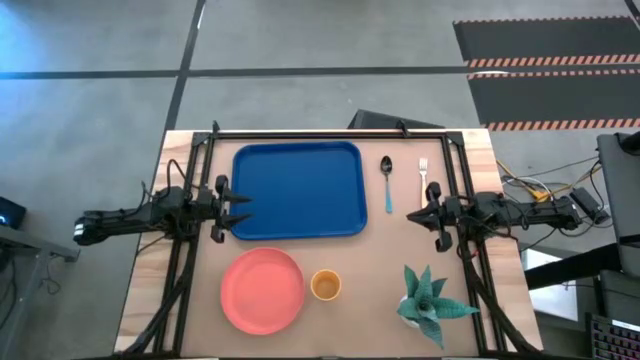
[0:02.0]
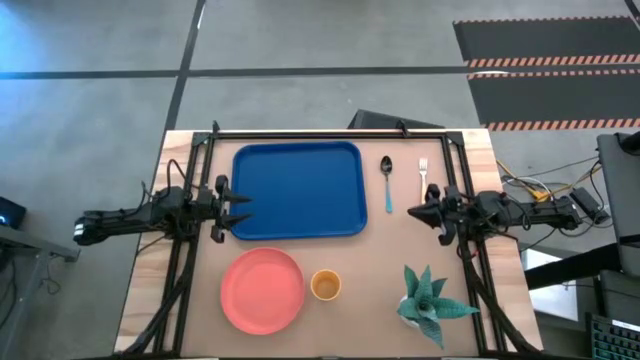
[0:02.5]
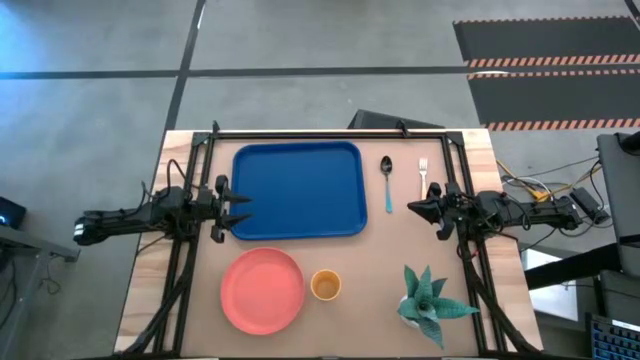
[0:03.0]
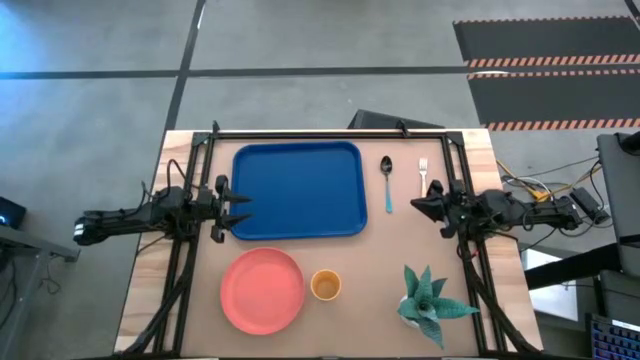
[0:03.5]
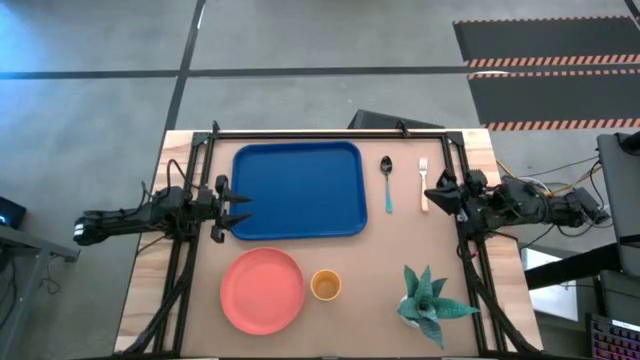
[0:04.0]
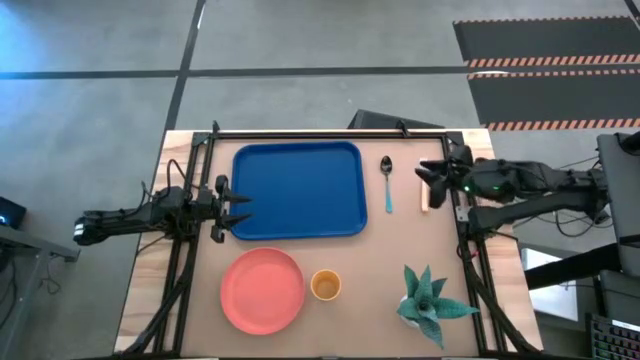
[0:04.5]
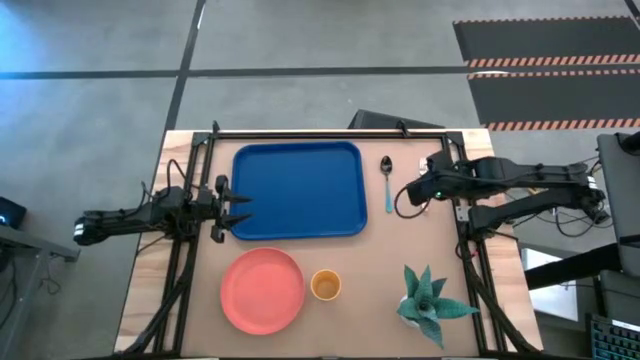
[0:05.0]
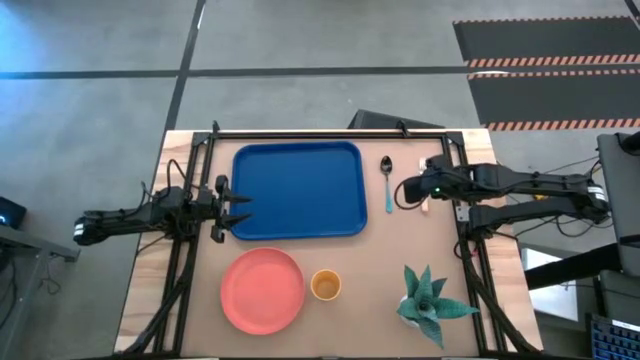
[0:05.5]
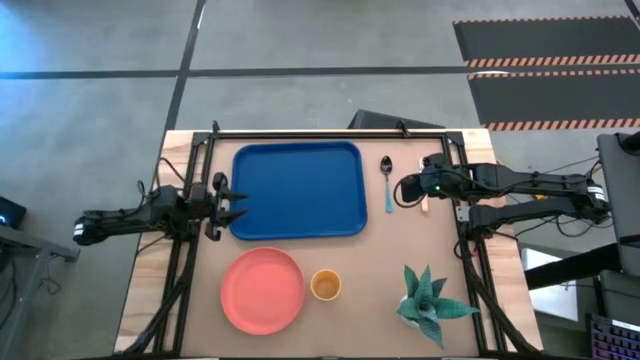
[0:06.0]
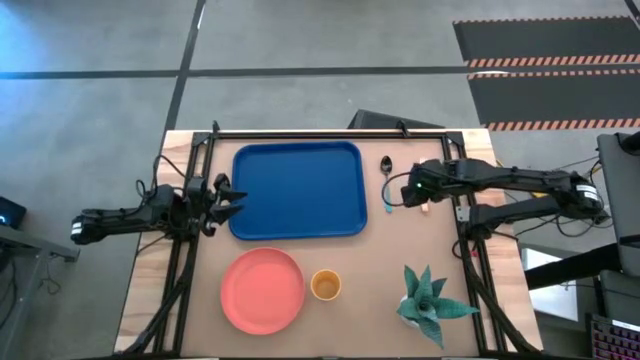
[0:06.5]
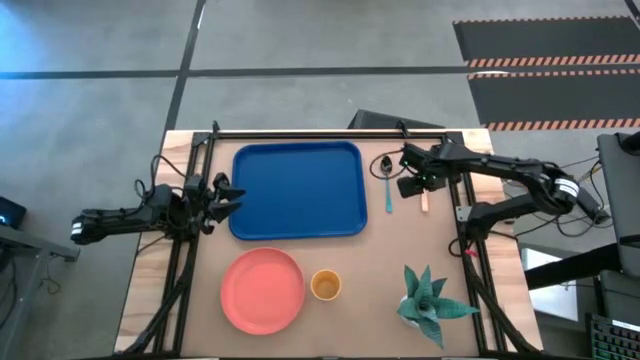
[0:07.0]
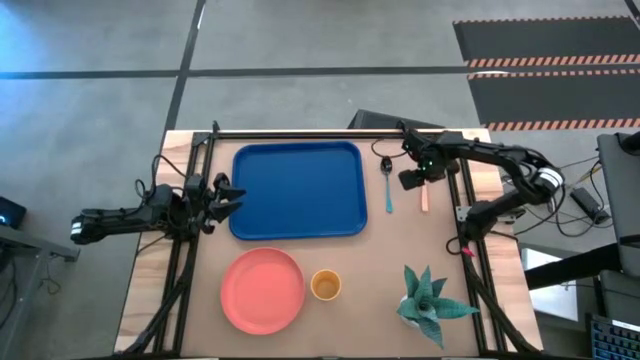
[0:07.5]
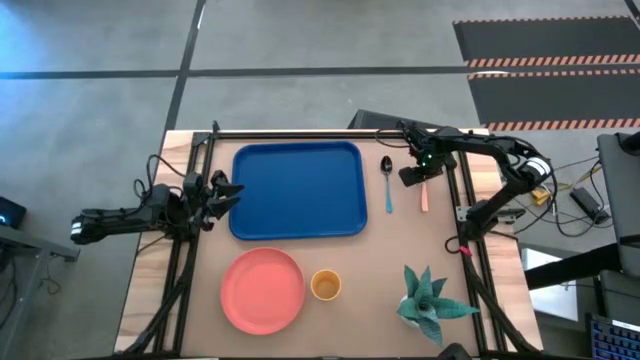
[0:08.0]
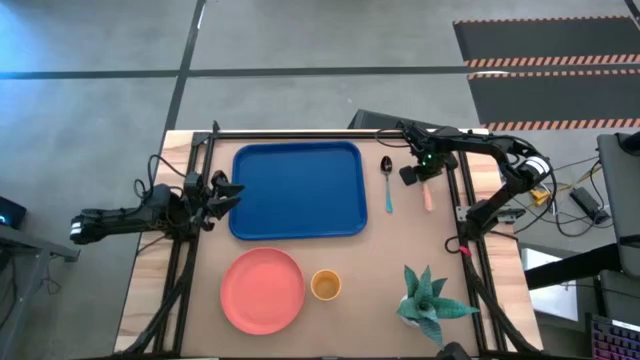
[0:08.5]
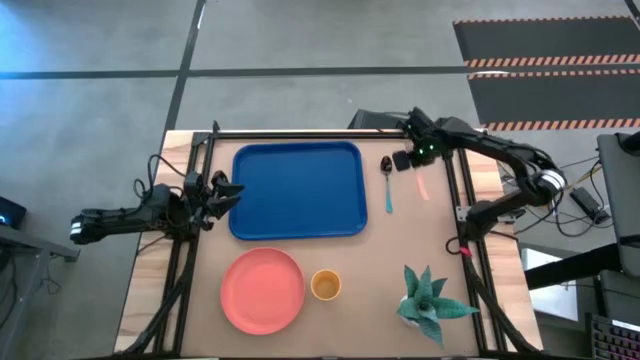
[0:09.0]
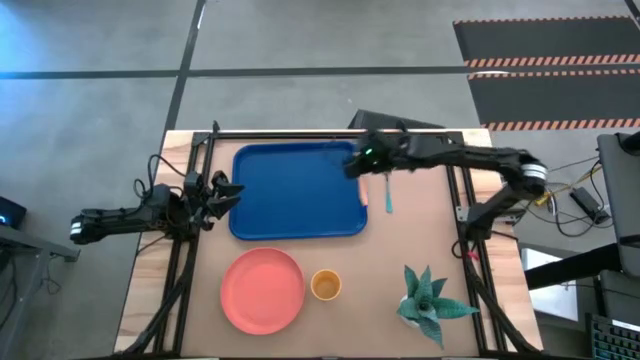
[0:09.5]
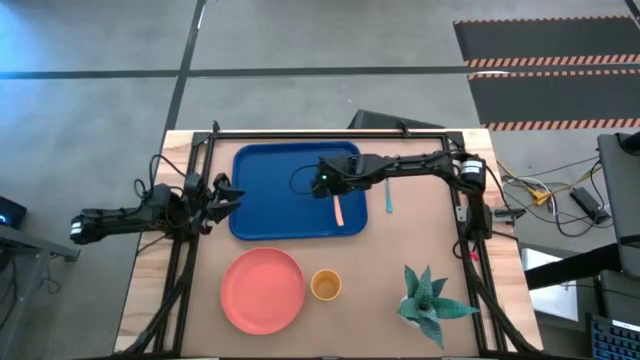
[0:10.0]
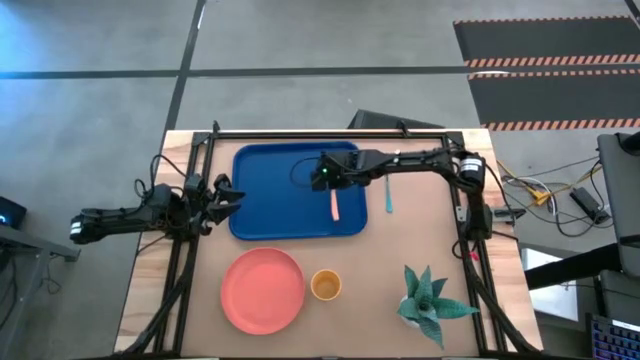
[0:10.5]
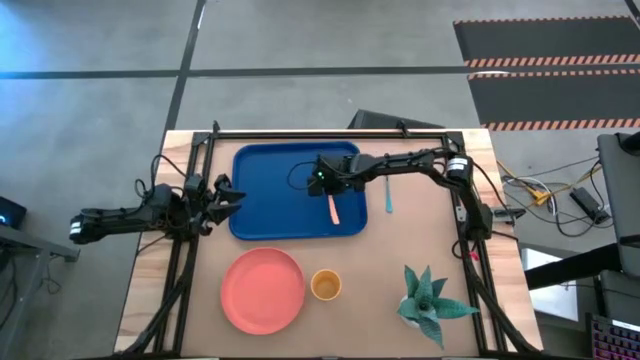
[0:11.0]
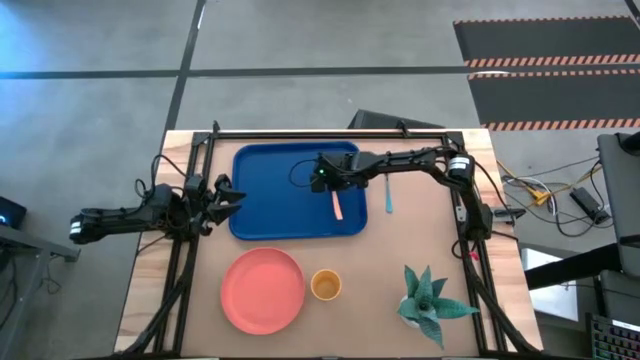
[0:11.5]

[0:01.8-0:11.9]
Task: Pick and place plate/cup/fork/spoon on tray
Put the orange fork on the blue tray

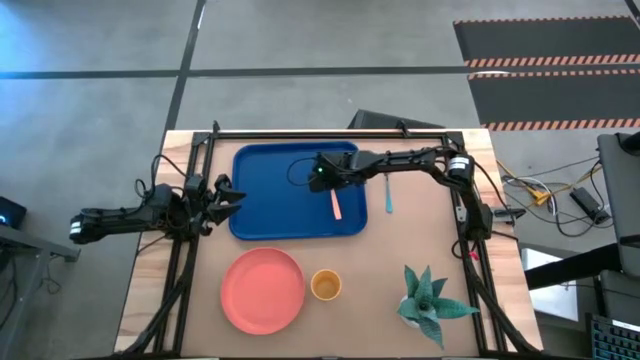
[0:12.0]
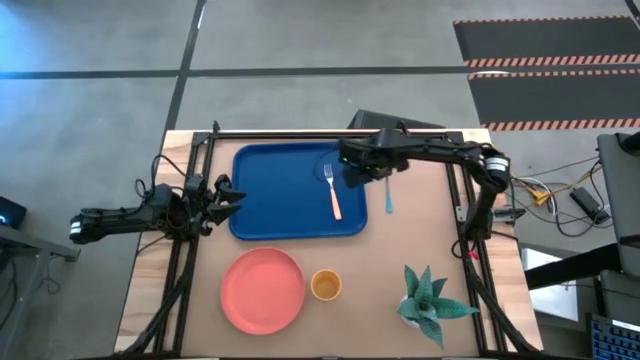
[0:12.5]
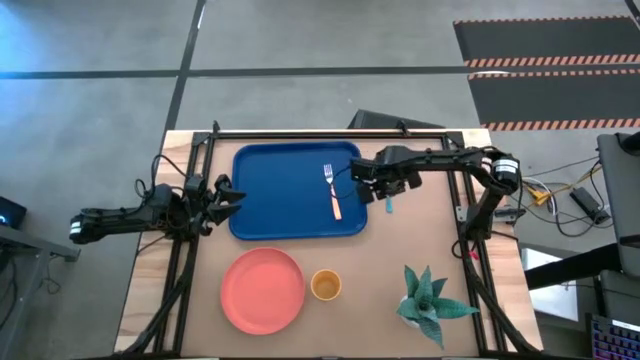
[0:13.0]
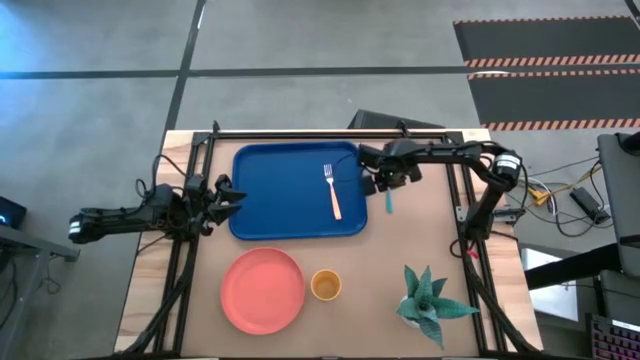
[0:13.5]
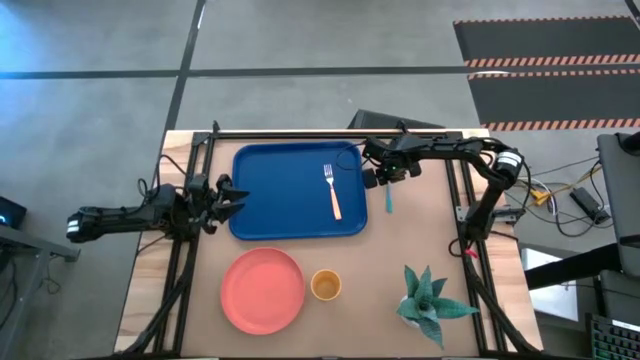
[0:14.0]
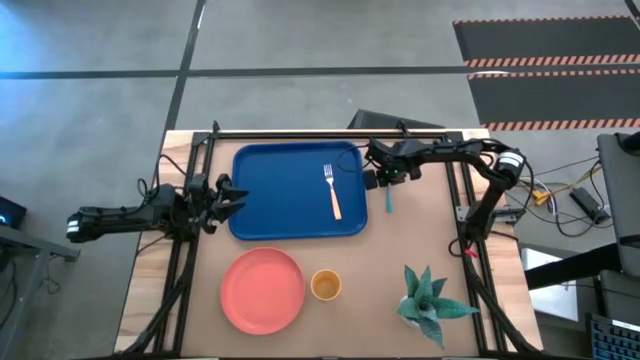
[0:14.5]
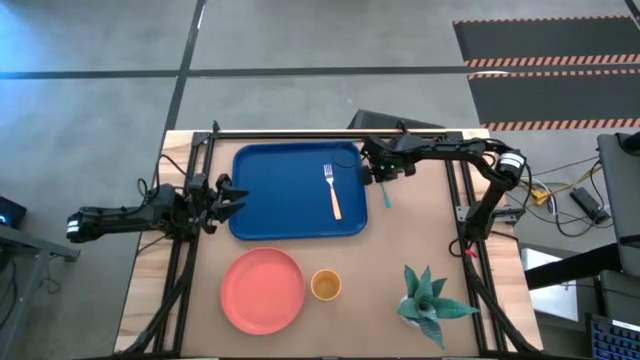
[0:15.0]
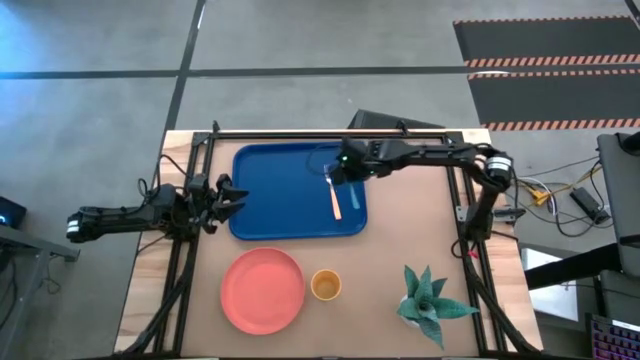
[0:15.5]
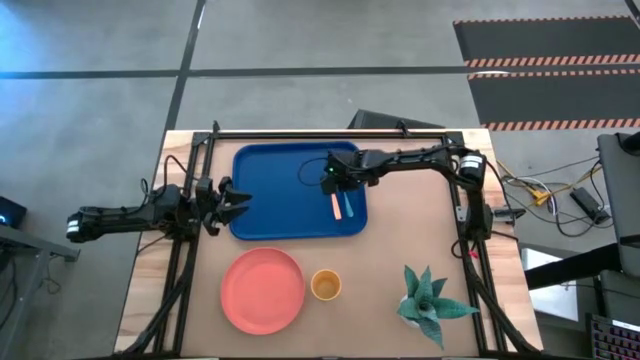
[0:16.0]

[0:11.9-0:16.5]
Put the blue spoon to the right of the orange fork on the blue tray

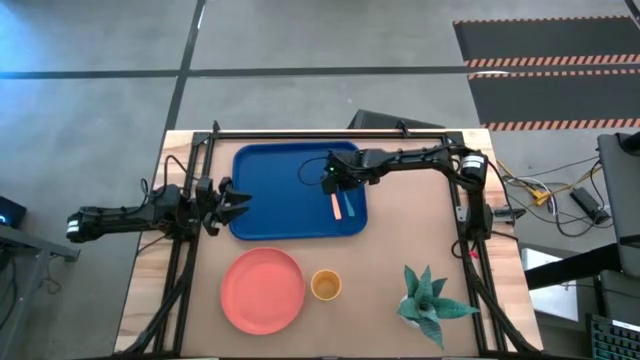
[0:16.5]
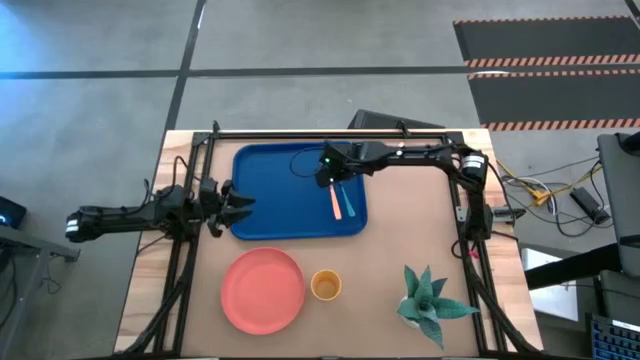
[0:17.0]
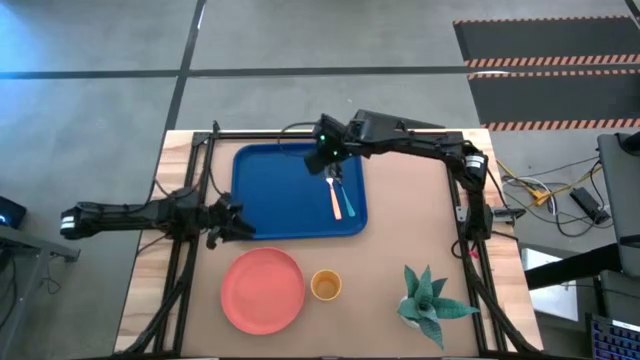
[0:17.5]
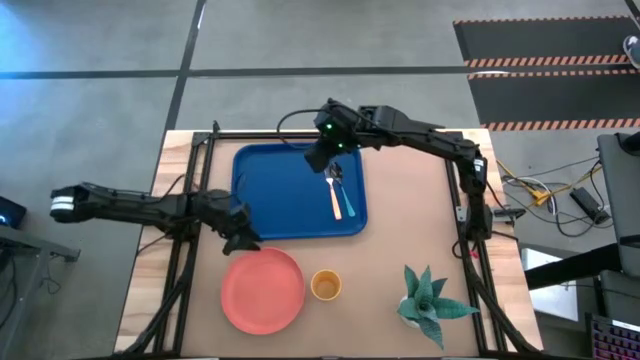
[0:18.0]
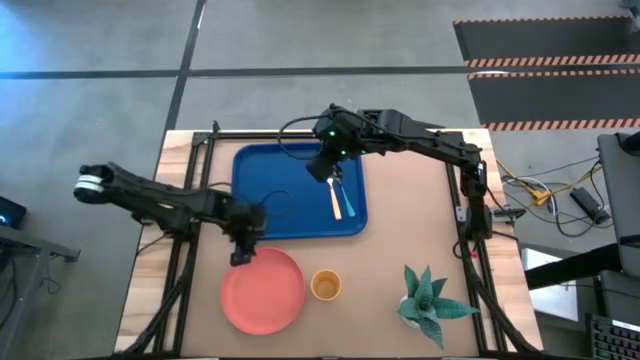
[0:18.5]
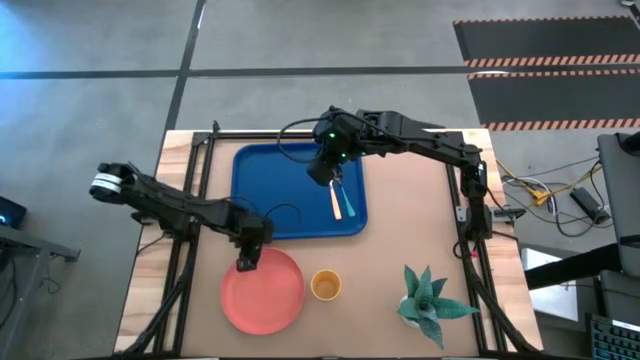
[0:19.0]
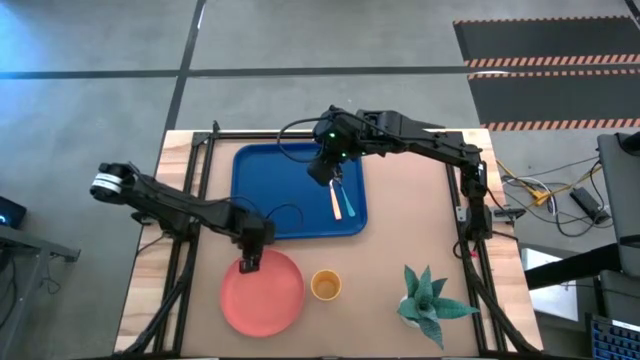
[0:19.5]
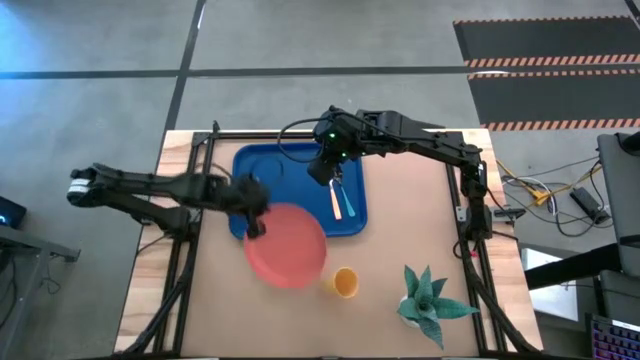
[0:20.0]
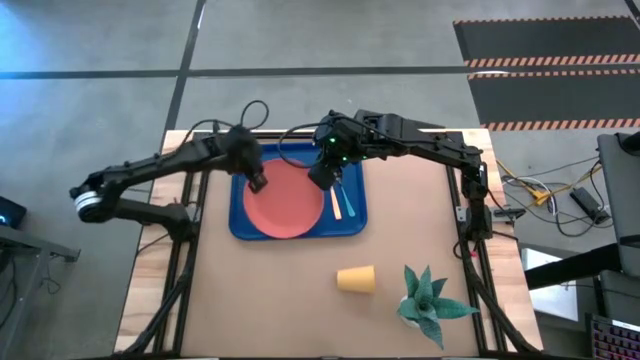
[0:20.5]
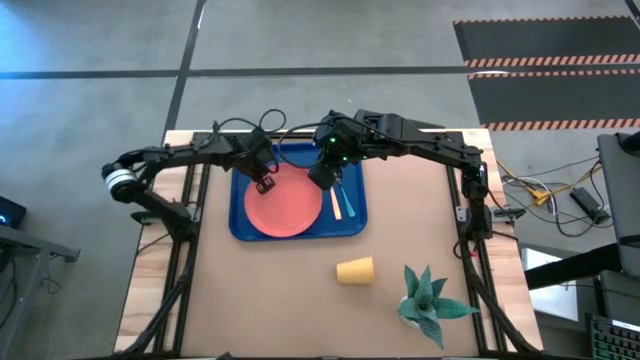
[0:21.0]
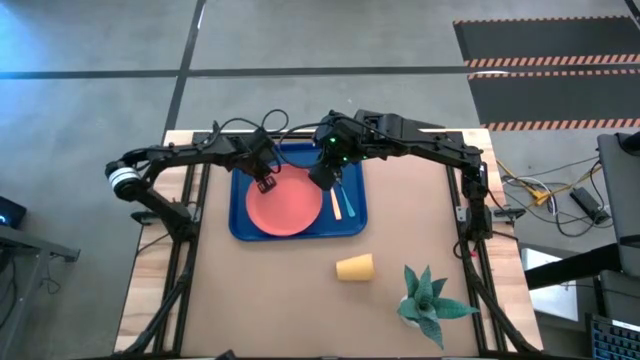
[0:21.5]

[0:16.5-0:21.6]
Put the orange plate to the left of the orange fork on the blue tray
